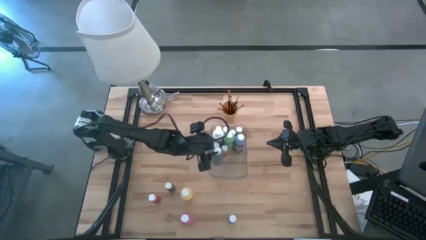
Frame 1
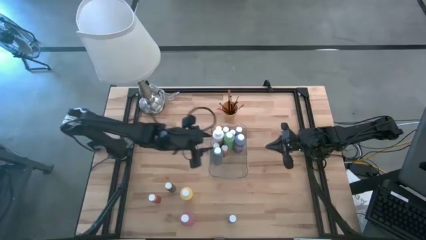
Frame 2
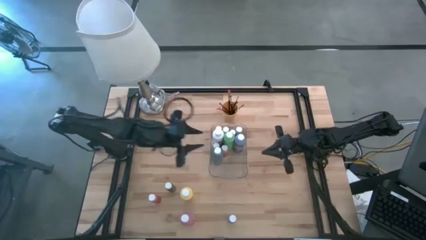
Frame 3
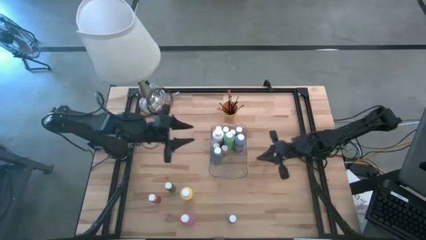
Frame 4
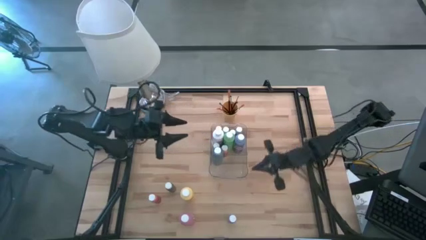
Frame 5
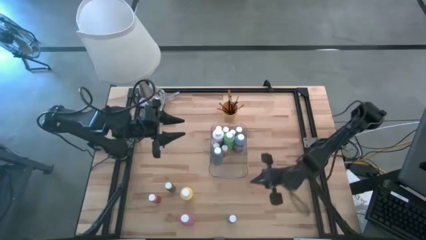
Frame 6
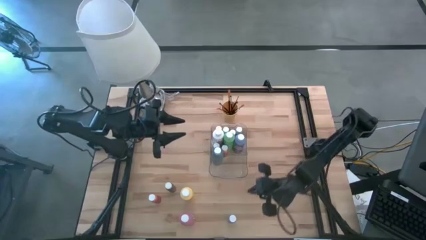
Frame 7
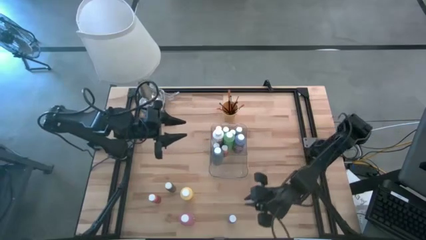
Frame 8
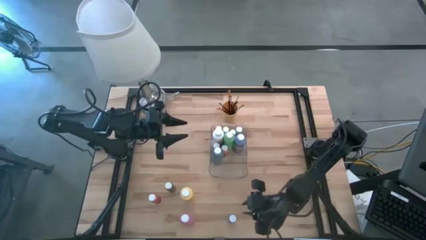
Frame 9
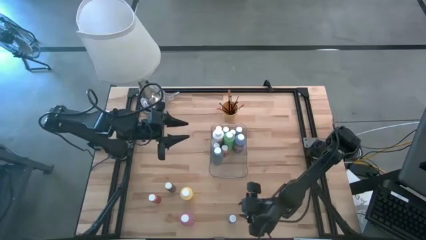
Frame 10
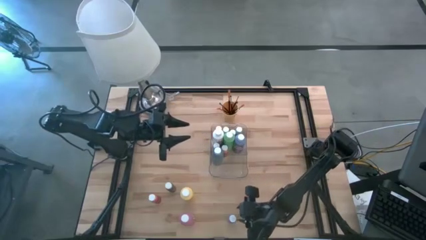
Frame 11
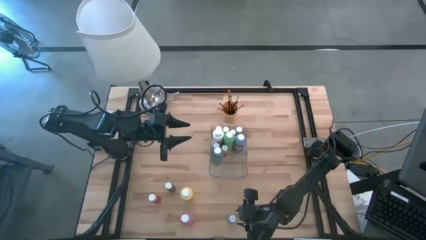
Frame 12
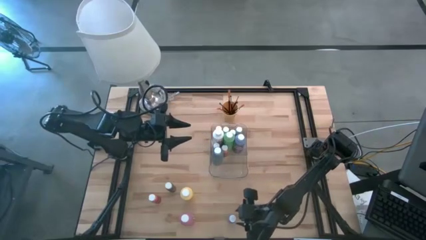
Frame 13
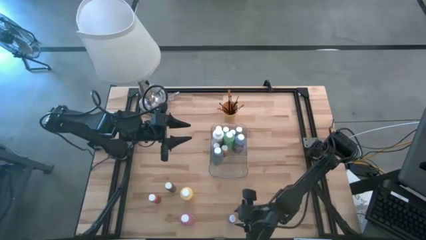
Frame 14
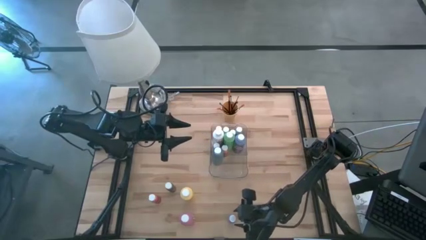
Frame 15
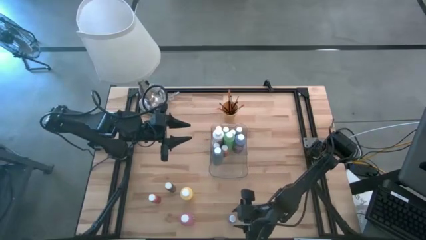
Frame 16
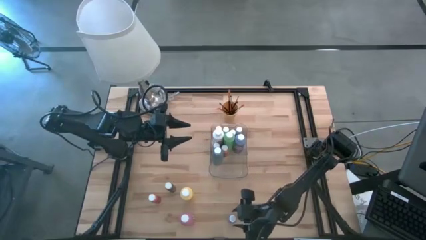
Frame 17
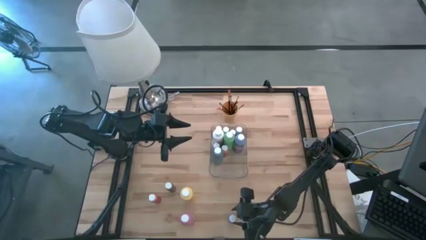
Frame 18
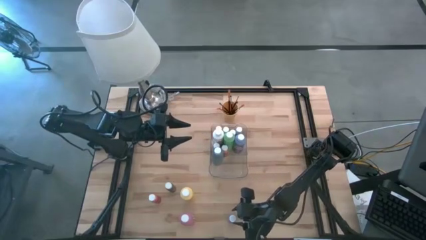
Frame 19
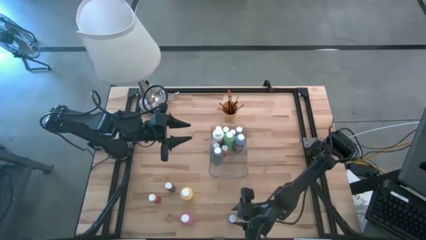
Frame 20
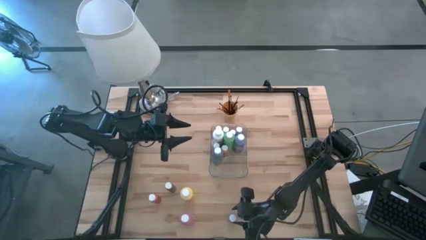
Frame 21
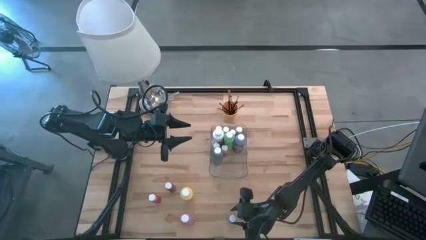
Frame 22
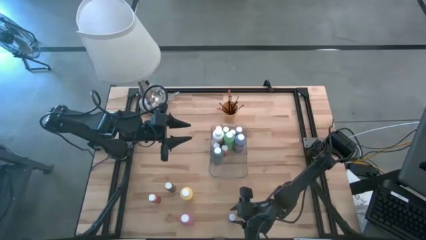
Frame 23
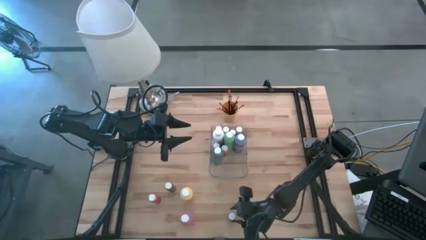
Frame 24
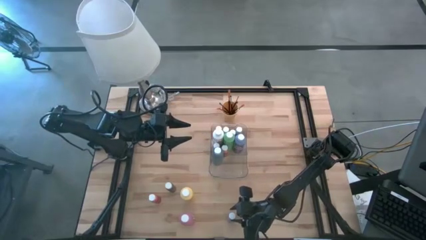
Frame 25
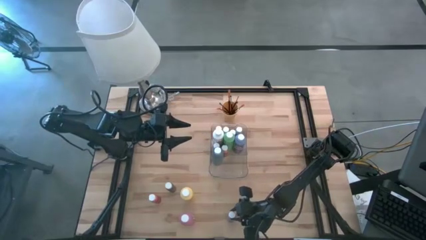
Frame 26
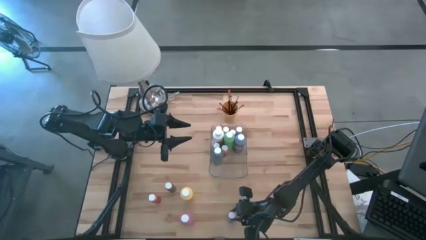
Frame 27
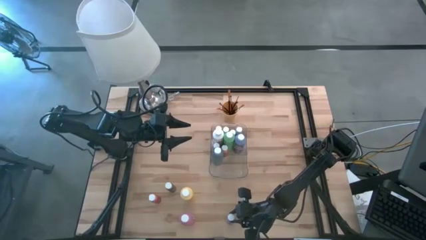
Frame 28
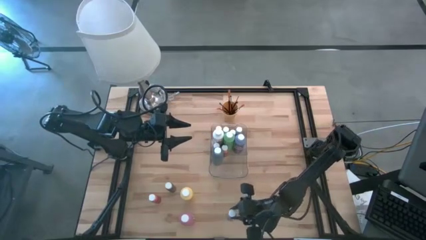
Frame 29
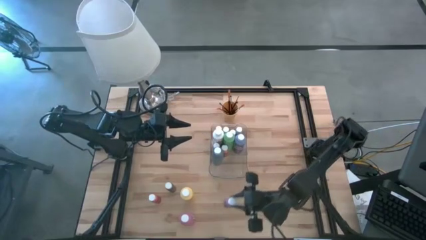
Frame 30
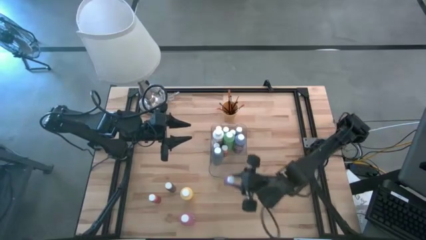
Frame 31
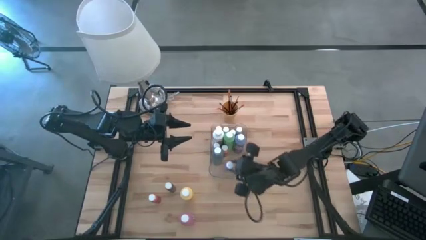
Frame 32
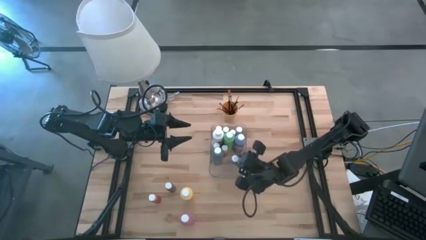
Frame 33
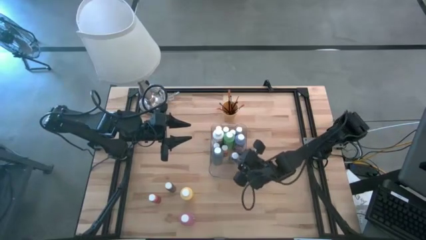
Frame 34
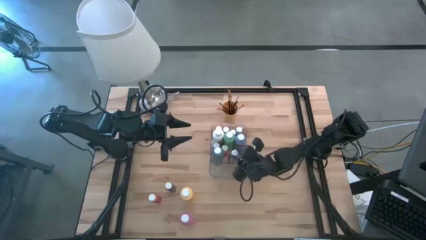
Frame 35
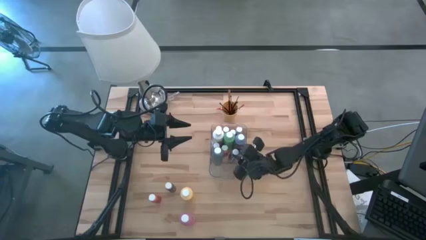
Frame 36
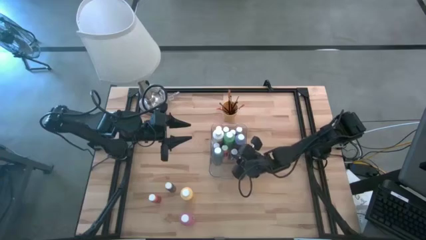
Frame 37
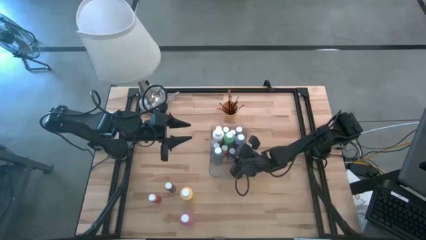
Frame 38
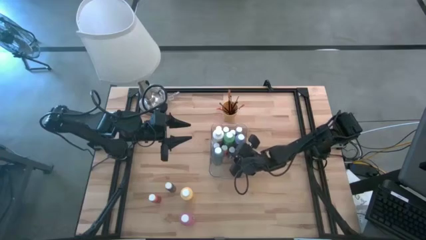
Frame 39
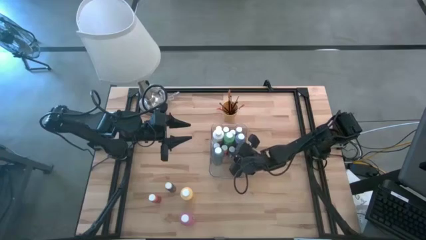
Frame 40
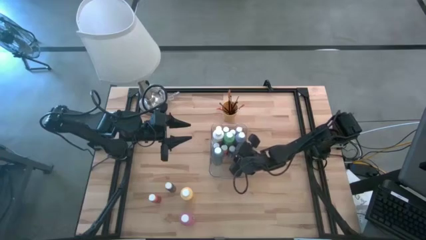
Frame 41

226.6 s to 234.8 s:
Task: Pick & Place Paint Supplies
Put the small violet paint bottle into the transparent bin

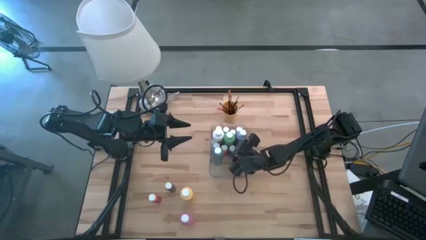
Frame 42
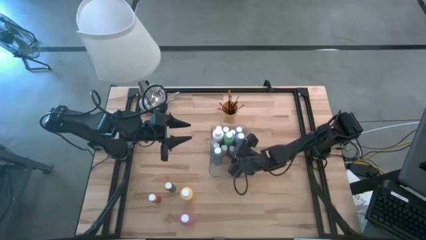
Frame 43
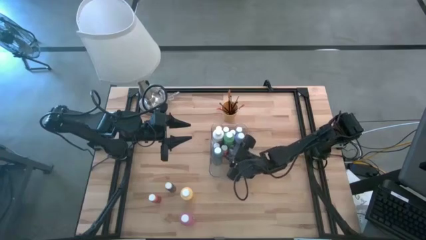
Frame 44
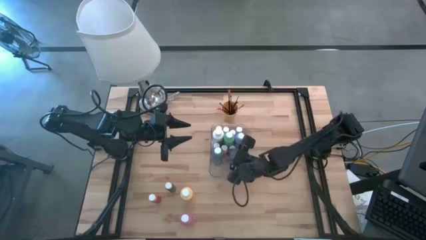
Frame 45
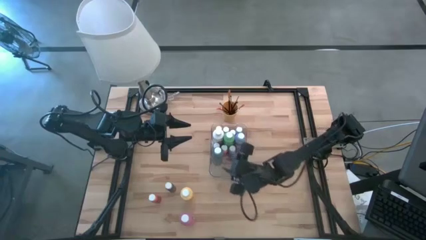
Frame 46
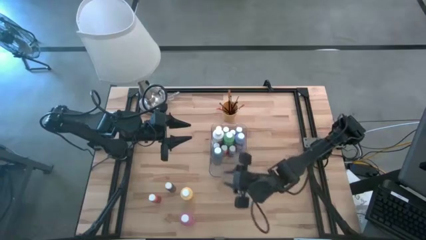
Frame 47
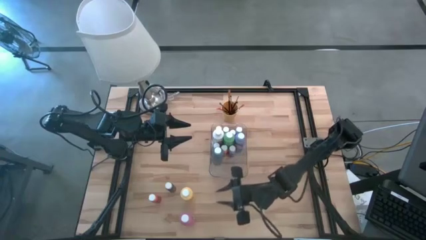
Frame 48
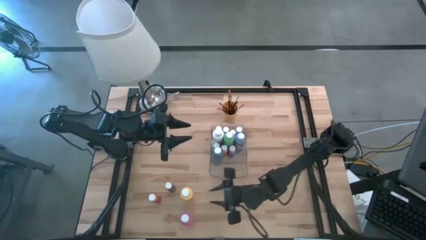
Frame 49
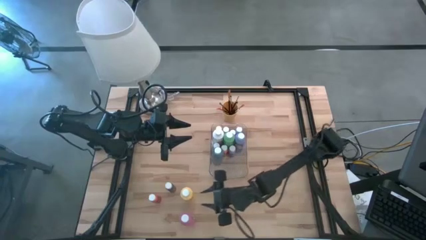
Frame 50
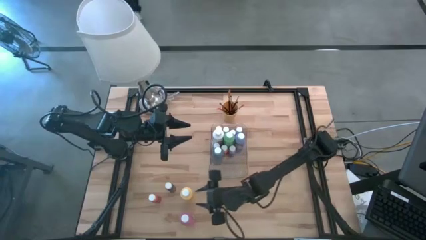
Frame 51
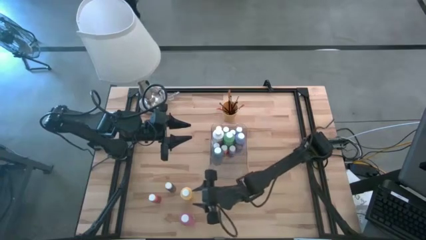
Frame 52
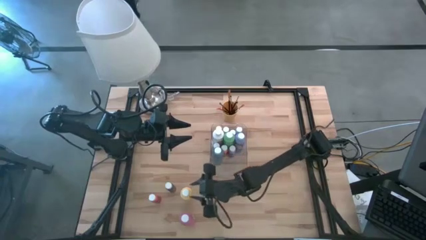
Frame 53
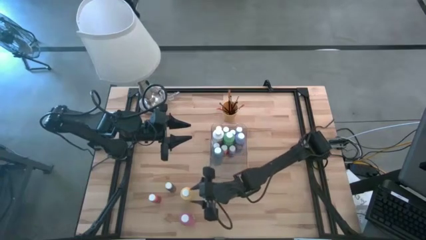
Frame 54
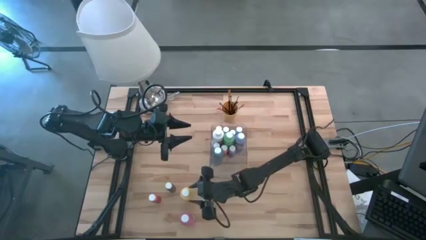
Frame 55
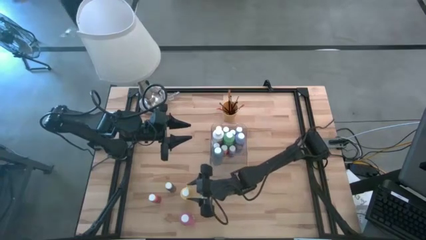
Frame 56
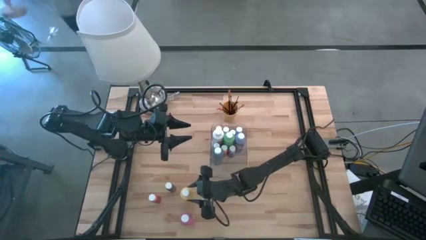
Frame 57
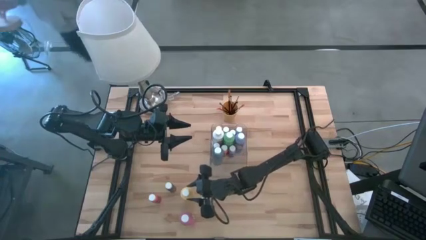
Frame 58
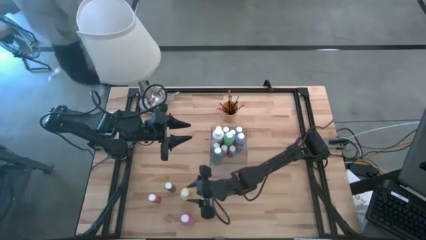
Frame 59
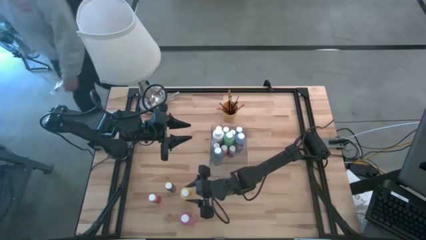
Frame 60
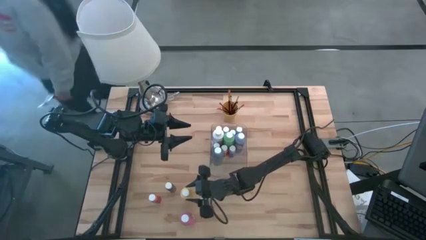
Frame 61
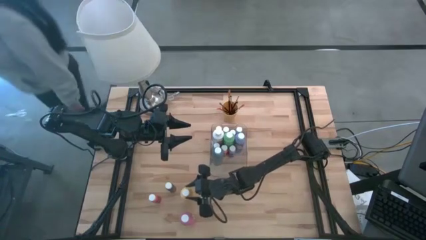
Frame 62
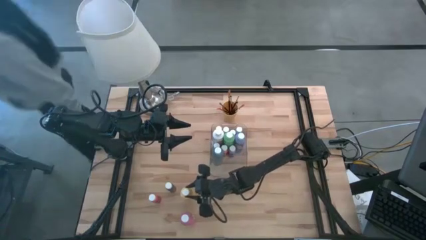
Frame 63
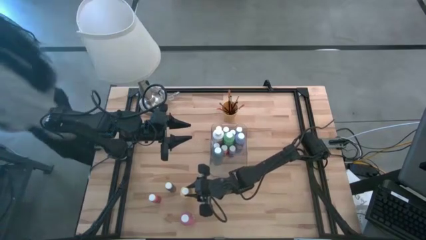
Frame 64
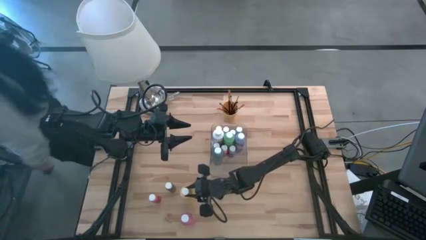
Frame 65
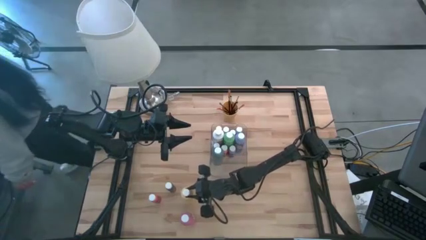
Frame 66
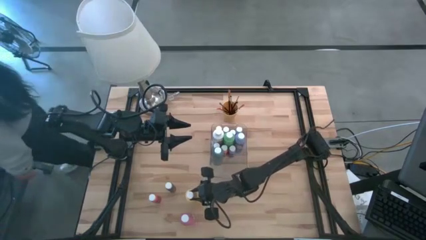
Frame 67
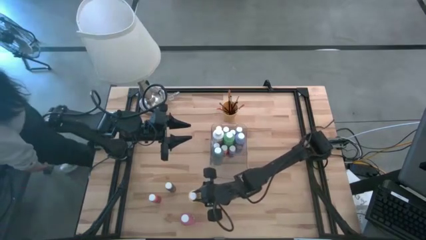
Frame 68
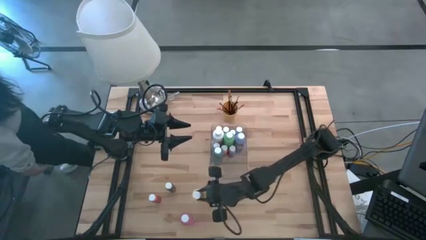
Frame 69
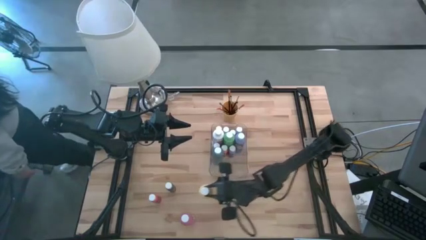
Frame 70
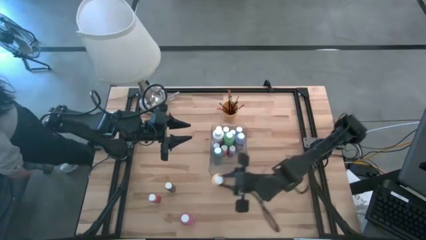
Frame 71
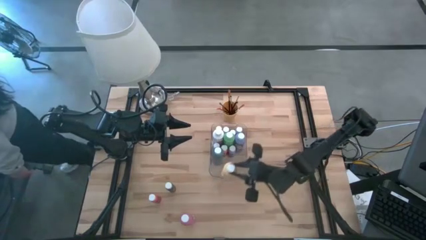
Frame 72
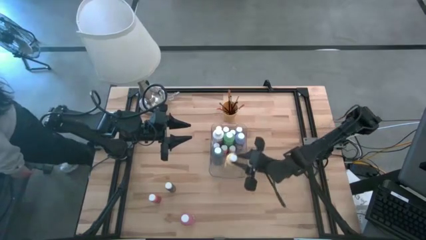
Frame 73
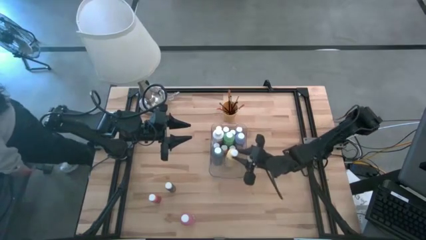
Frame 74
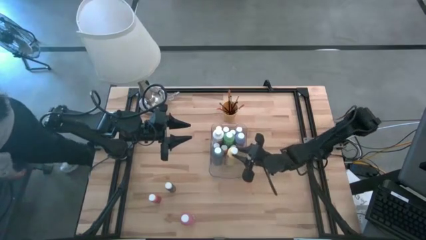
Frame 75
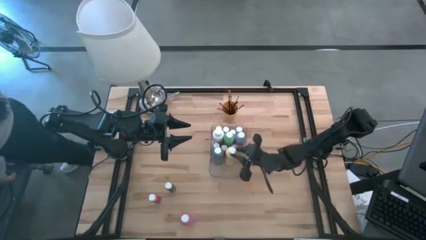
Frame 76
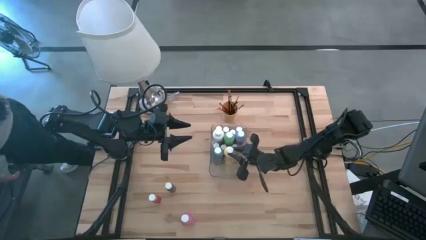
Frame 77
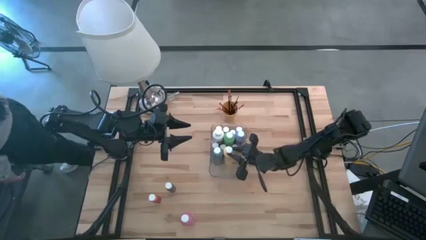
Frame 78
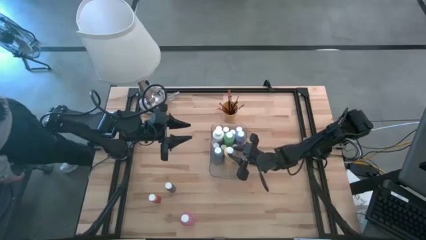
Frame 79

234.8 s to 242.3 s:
Put the large yellow paint bottle into the transparent bin
